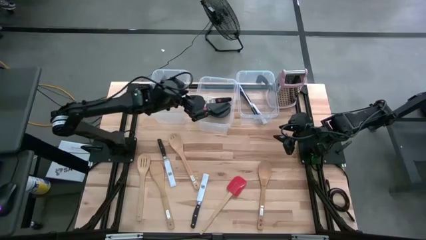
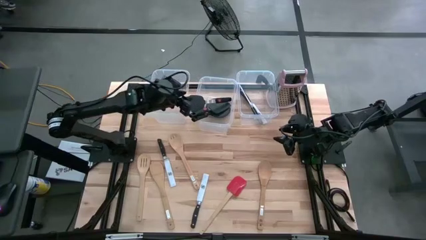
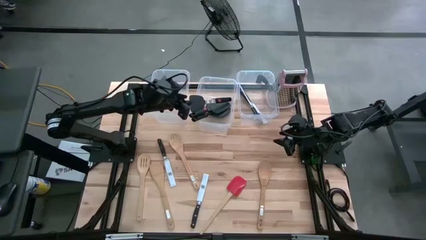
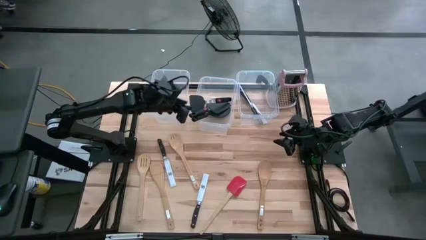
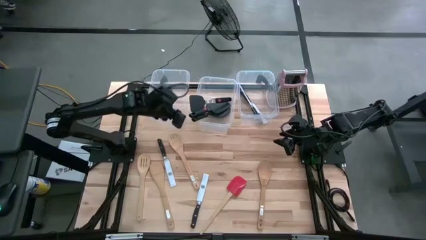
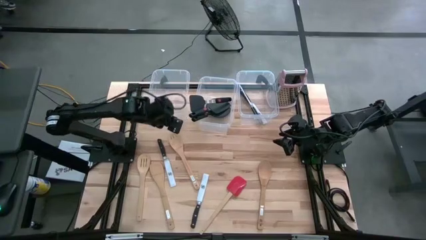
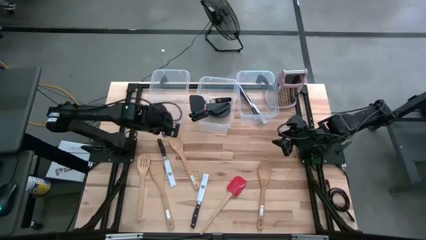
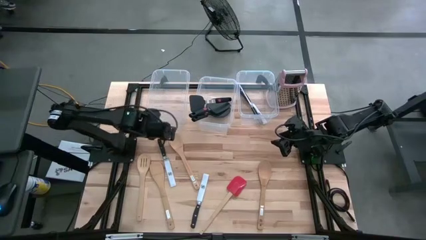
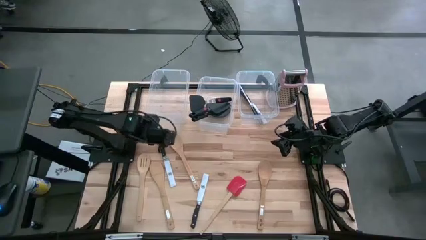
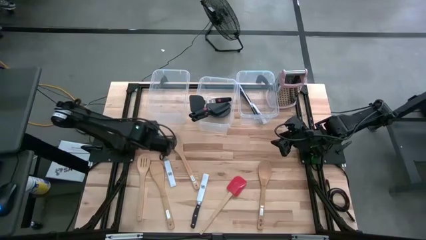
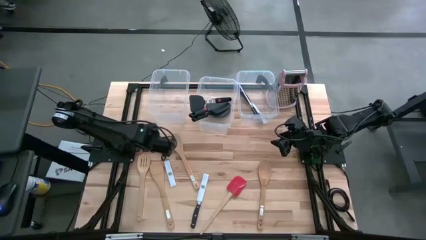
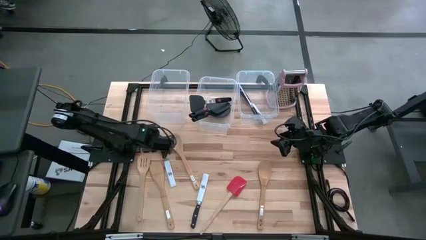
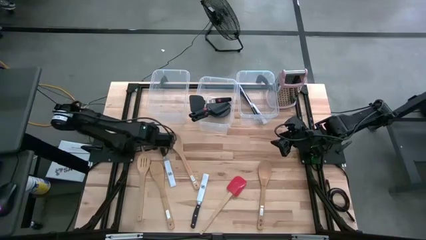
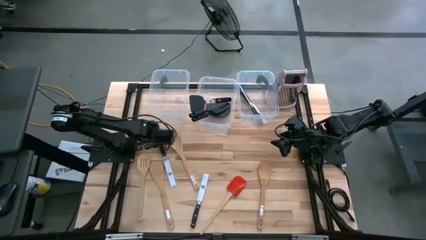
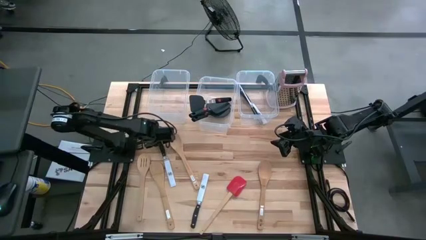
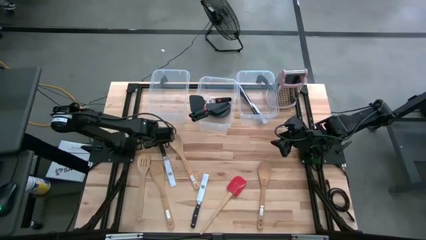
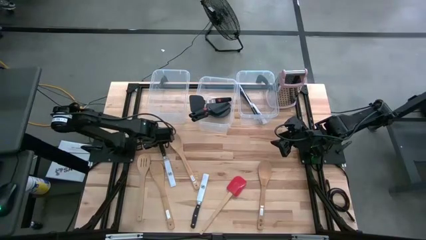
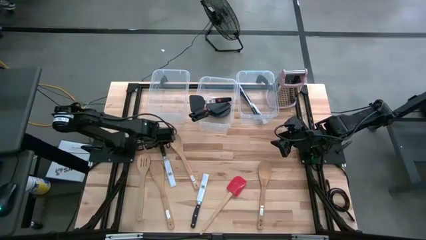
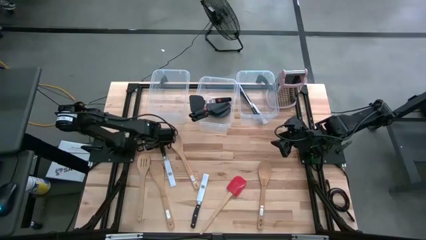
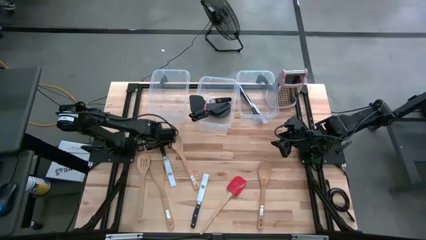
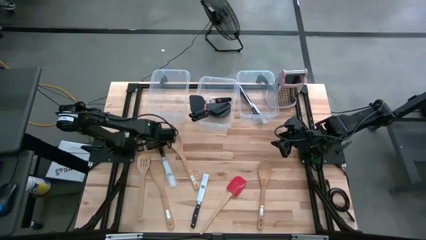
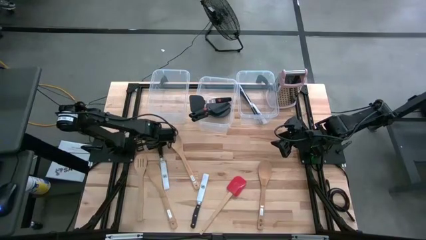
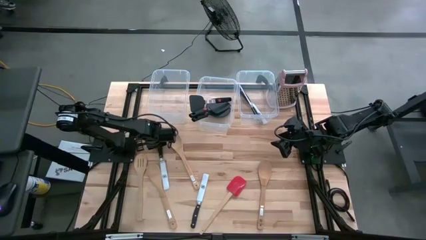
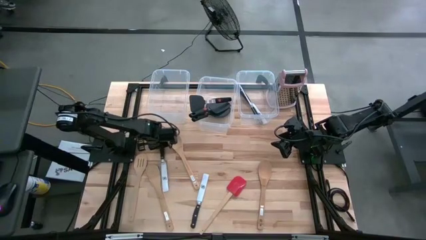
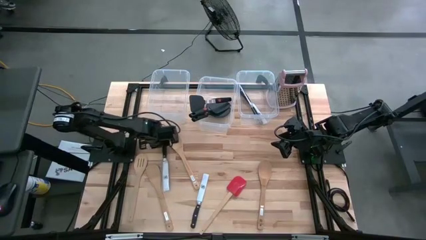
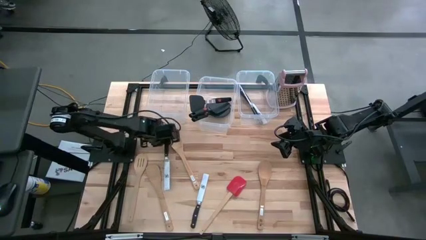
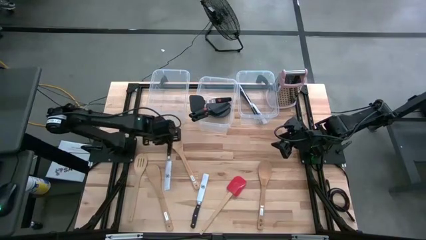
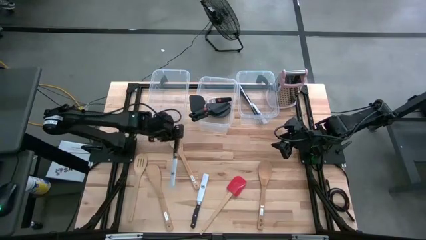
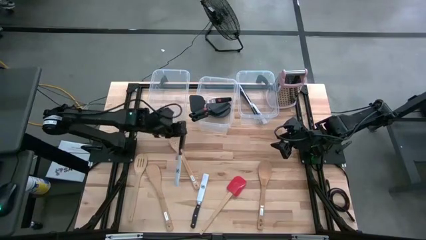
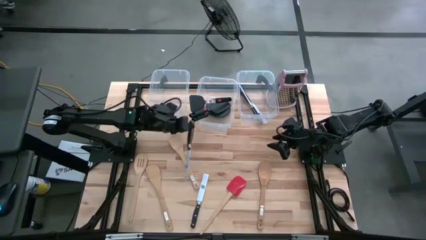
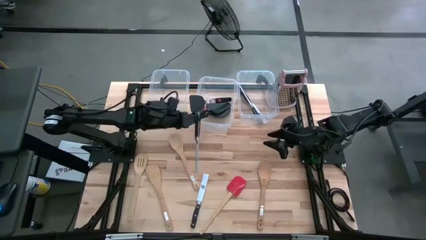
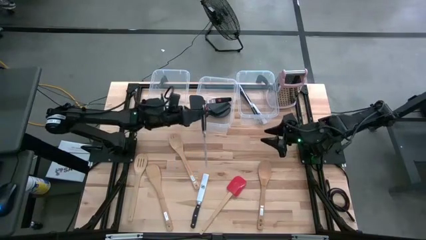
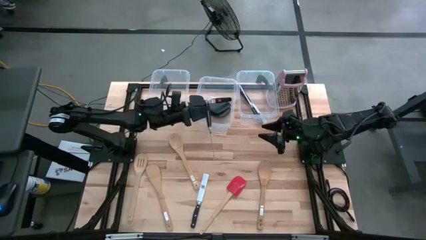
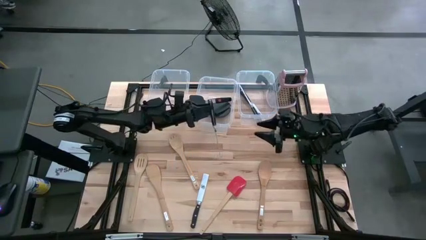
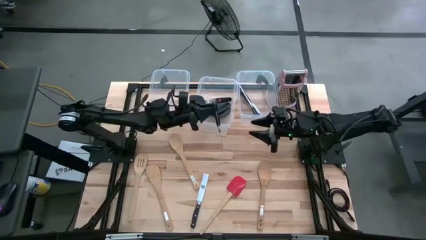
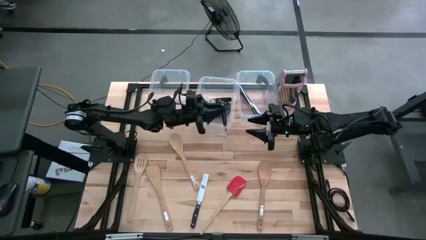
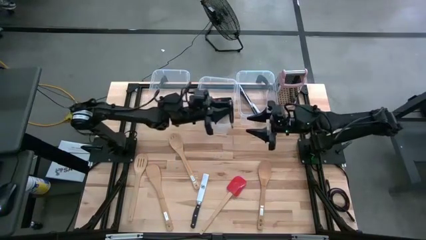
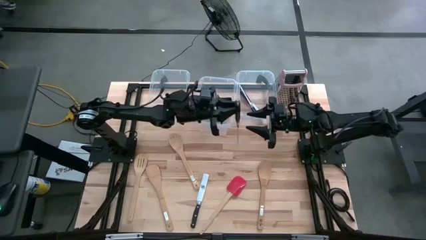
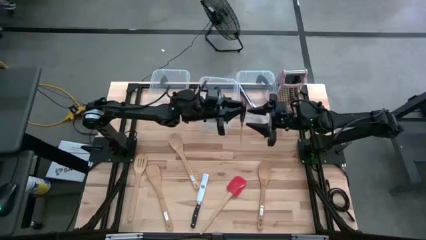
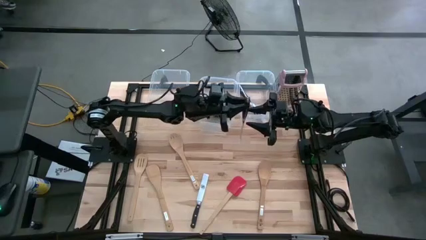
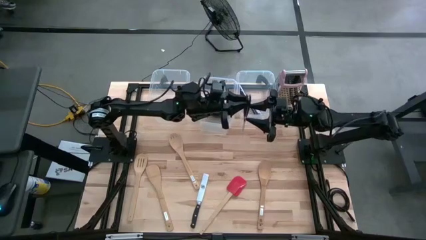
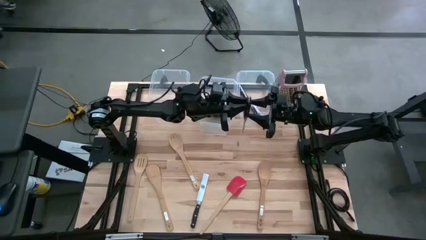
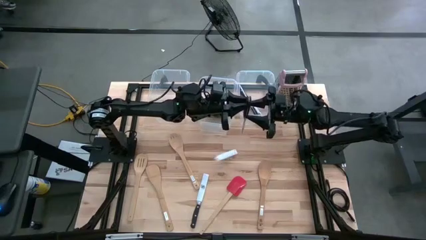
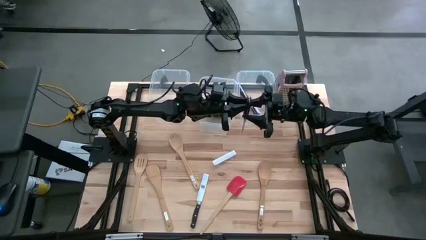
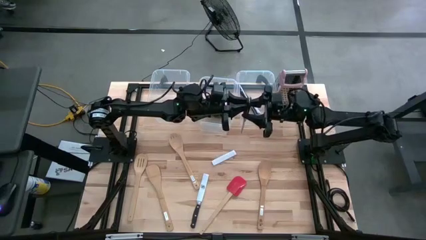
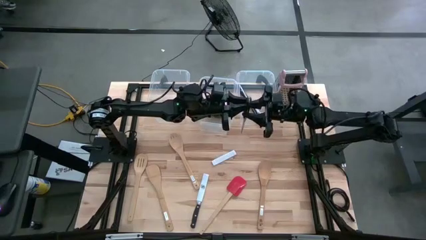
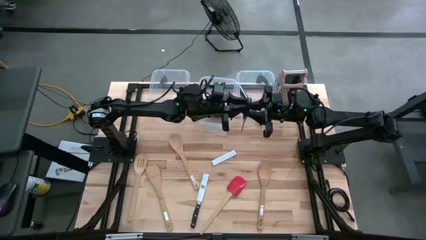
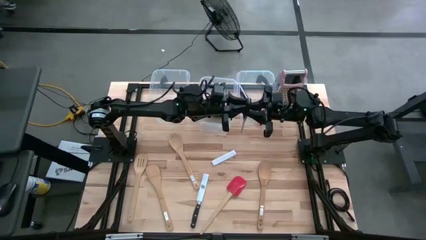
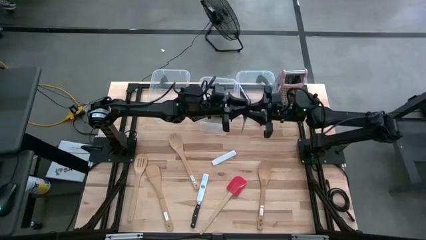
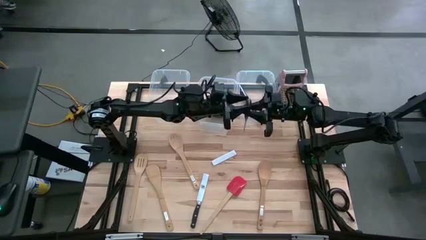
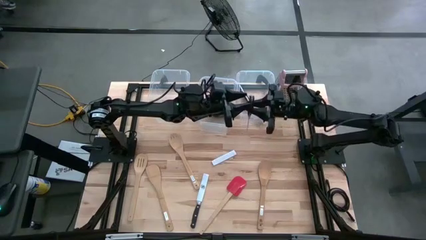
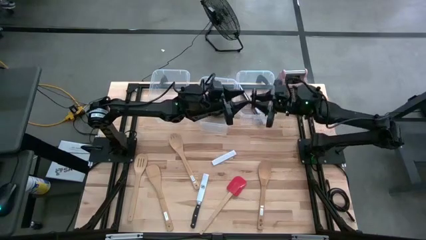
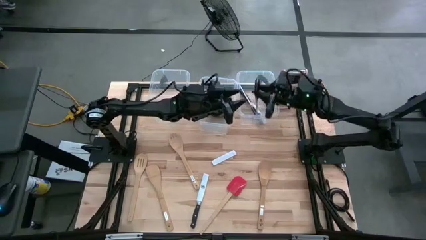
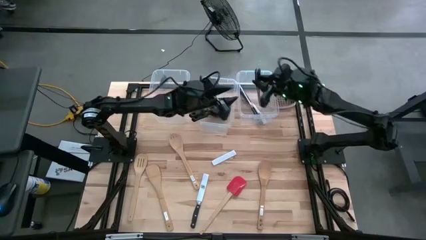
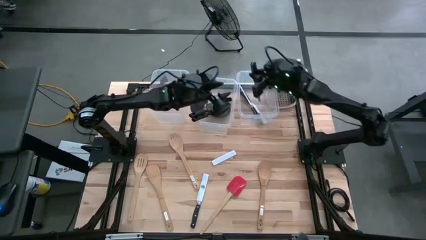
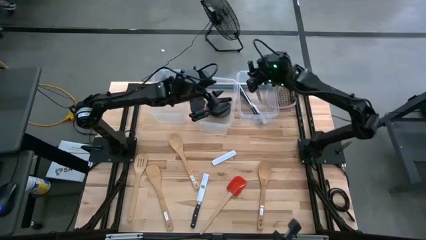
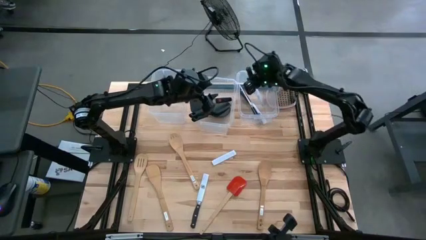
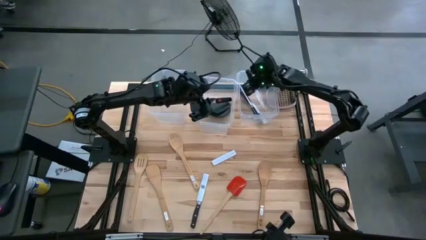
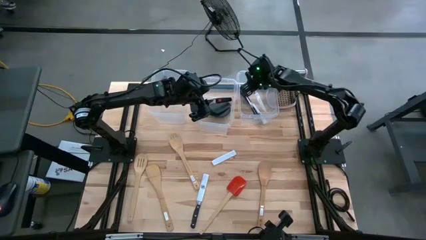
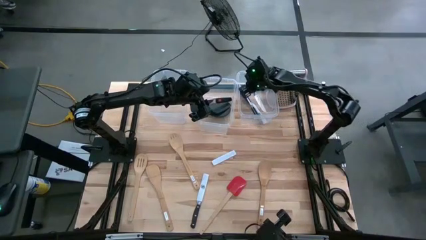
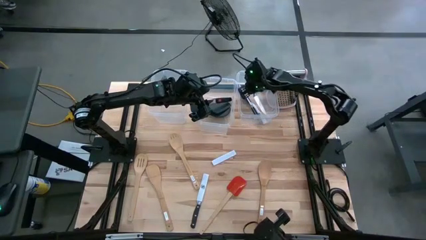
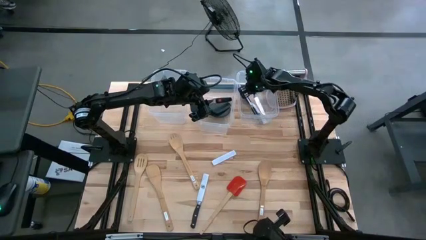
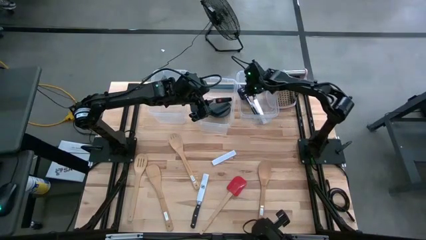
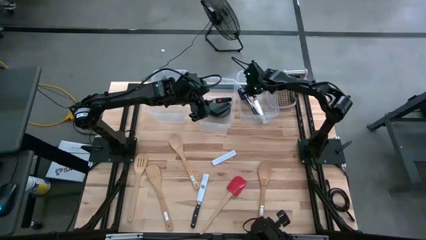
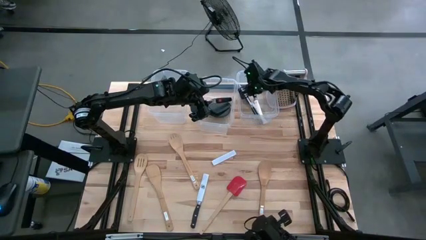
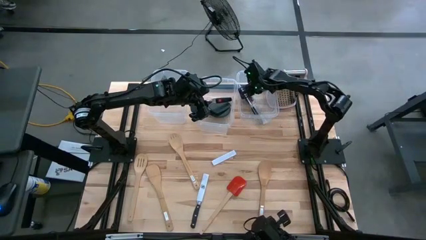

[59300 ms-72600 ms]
Task: Pick & Place Kitchen Items
Put the black knife into the right bin
